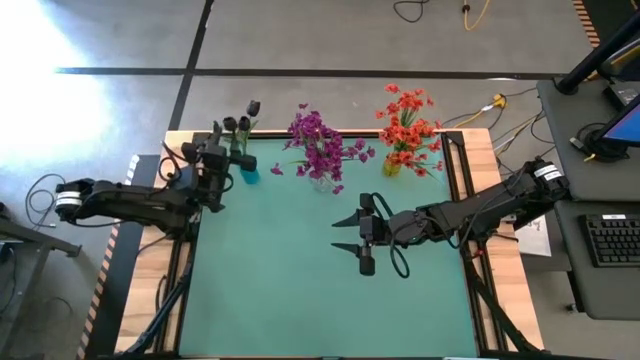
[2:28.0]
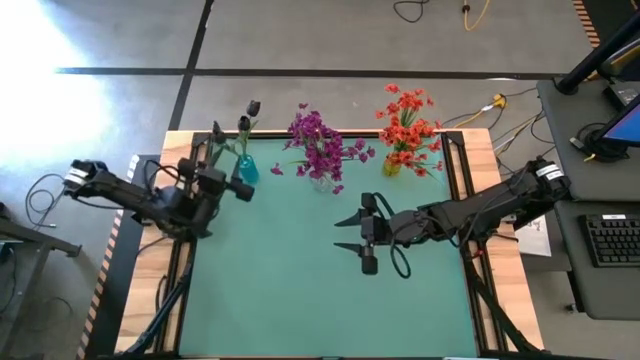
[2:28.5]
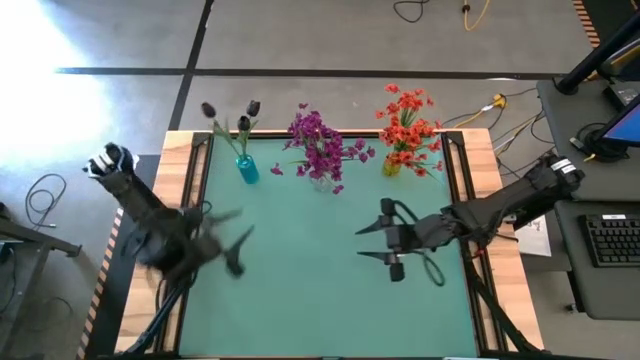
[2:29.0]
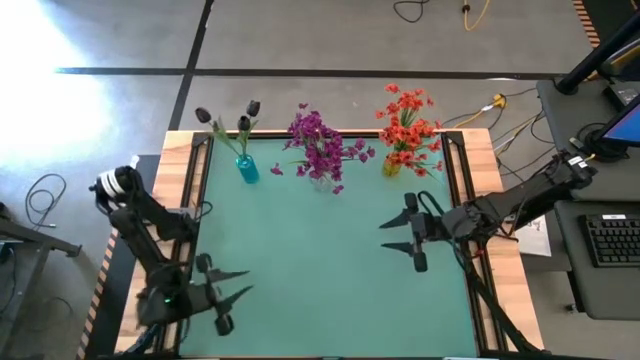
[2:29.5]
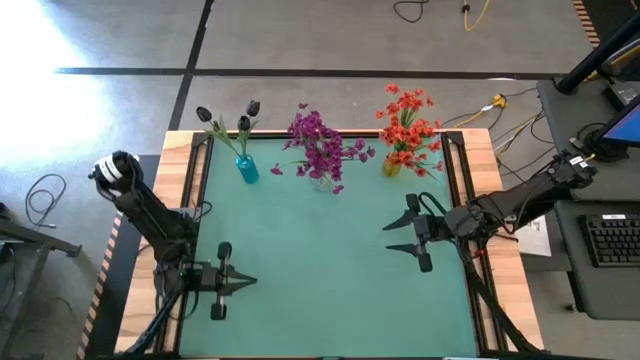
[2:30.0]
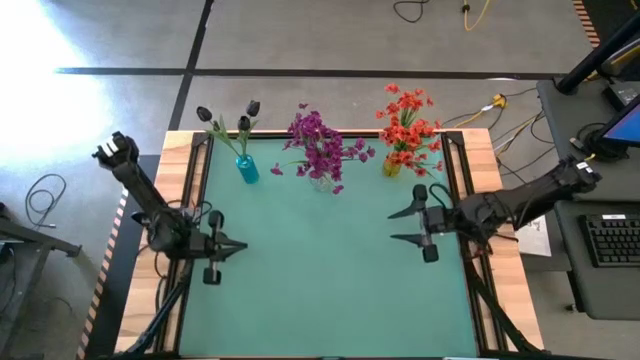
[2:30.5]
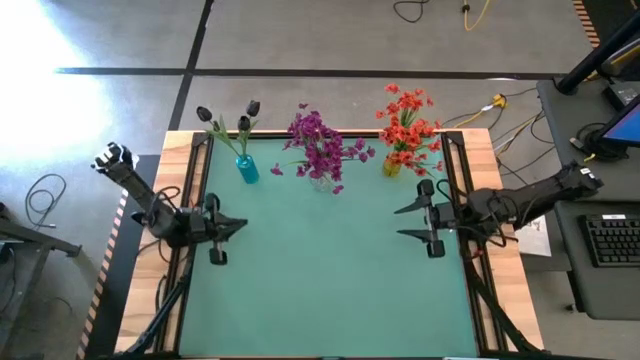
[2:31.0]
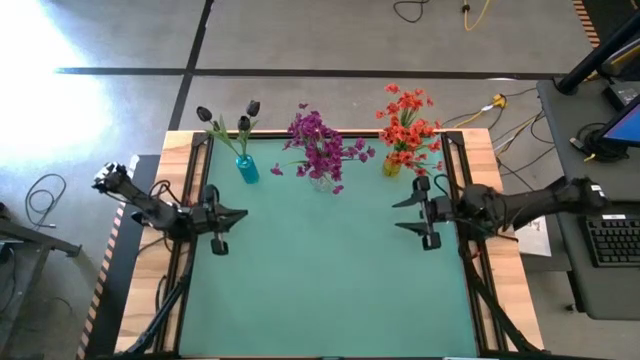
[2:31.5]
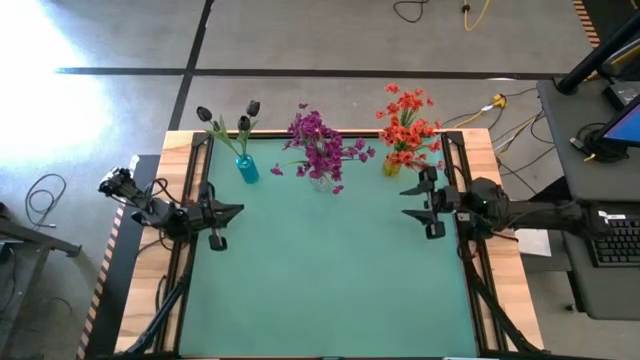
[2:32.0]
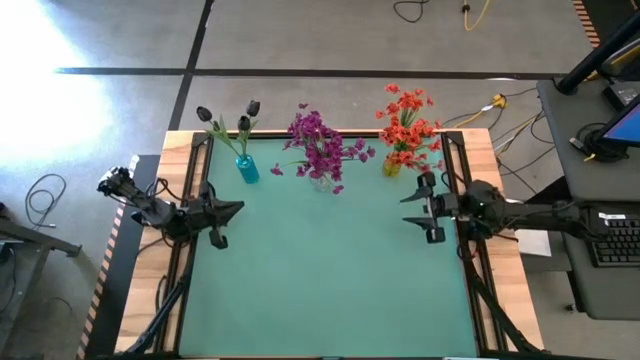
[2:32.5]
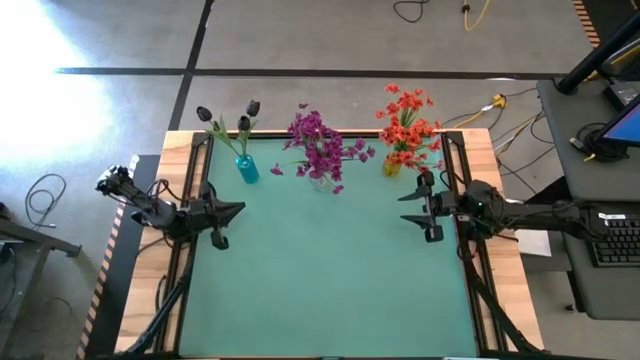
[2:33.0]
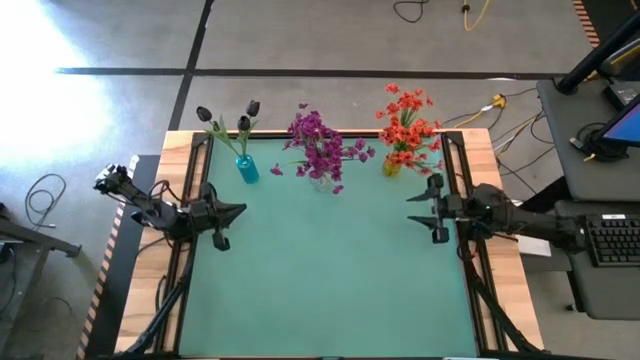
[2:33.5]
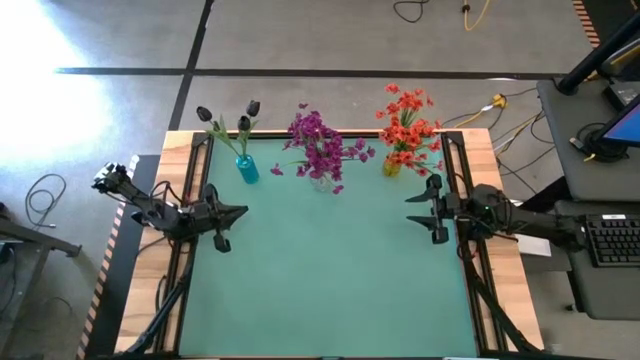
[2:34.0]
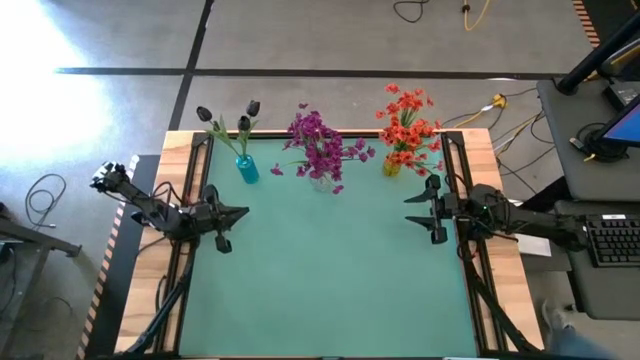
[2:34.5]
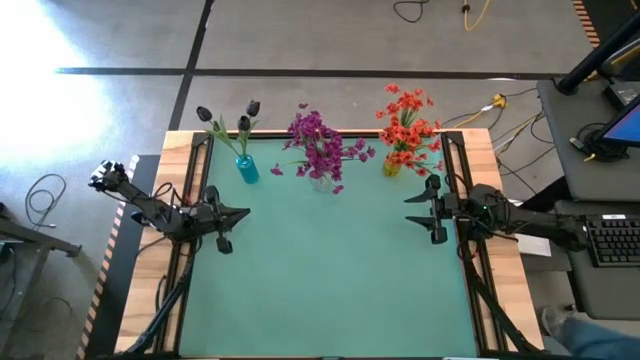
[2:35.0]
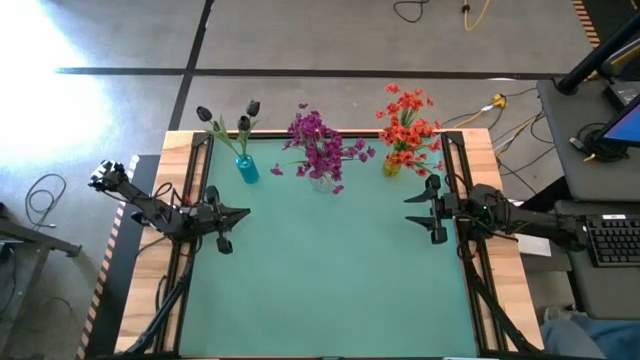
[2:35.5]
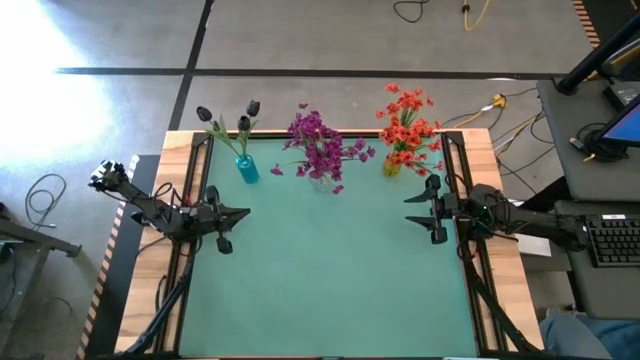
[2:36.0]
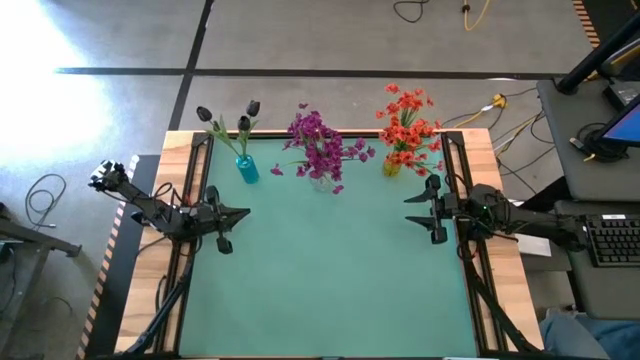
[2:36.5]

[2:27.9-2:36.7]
Task: Sort flowers into vase by color
Return to Home Position

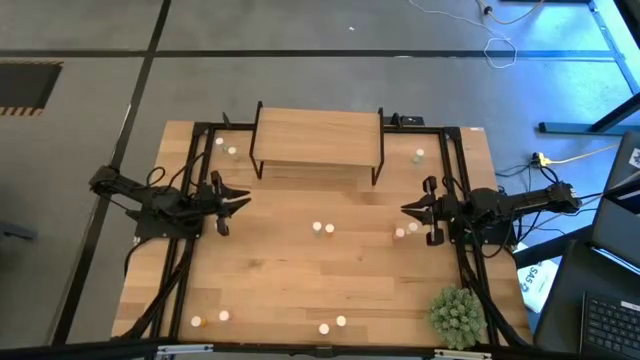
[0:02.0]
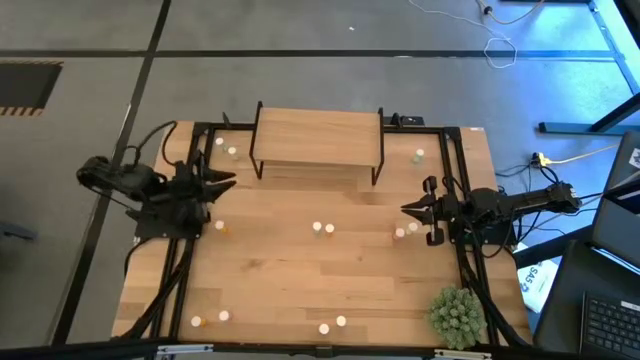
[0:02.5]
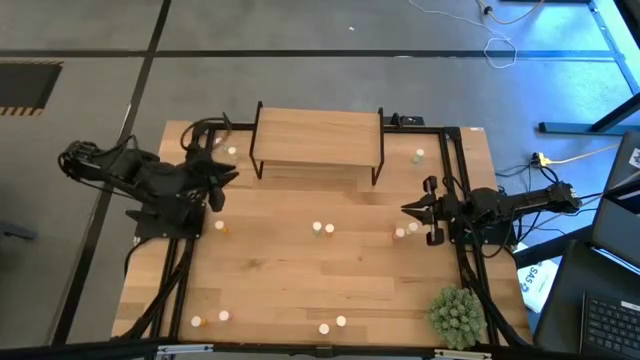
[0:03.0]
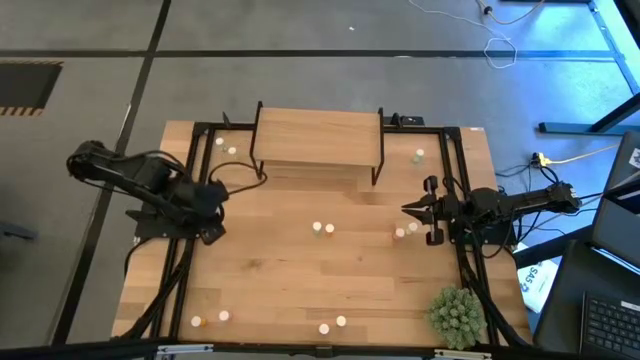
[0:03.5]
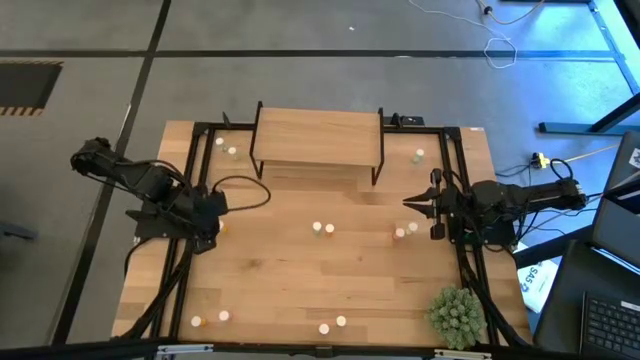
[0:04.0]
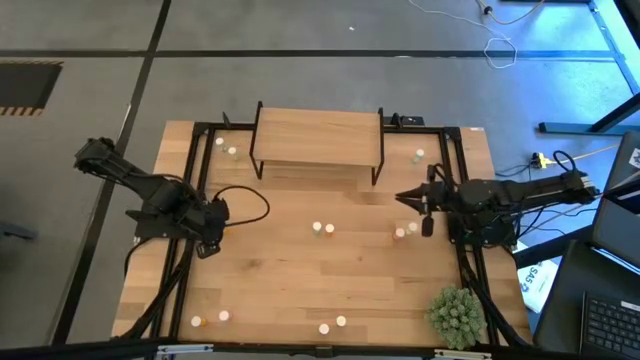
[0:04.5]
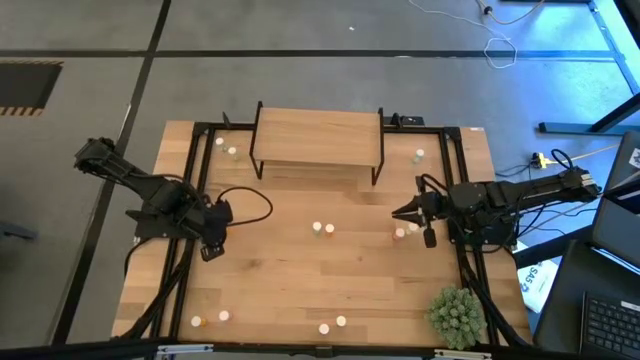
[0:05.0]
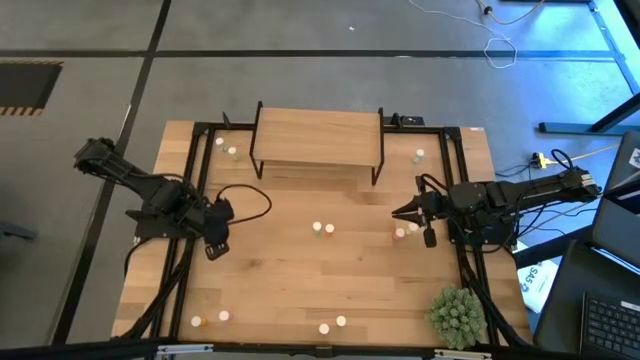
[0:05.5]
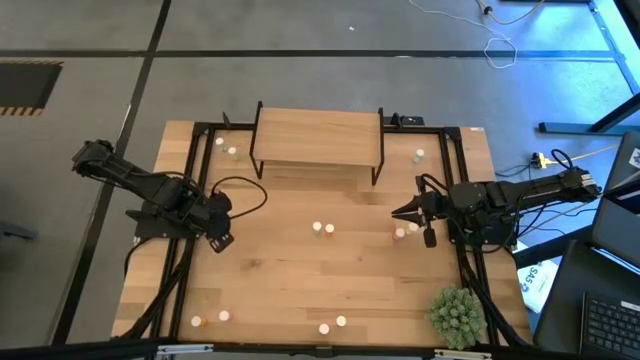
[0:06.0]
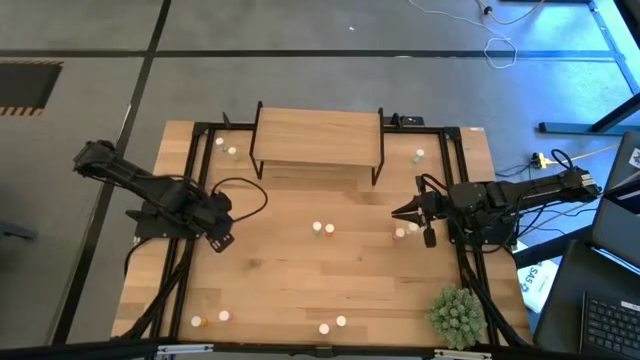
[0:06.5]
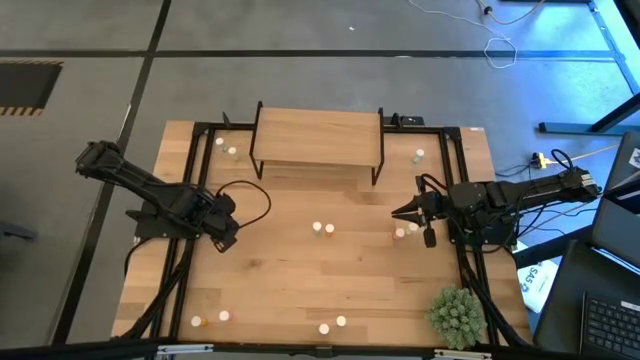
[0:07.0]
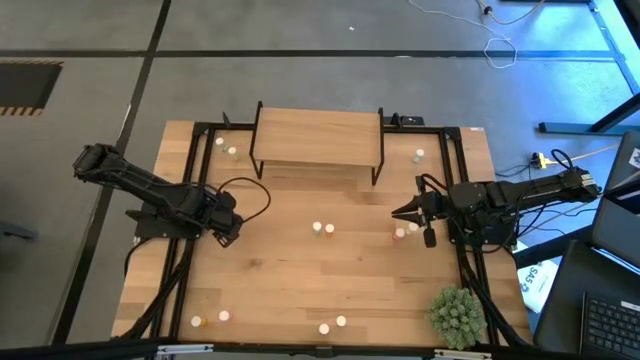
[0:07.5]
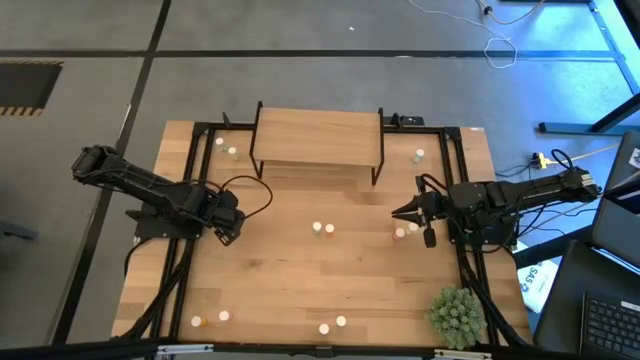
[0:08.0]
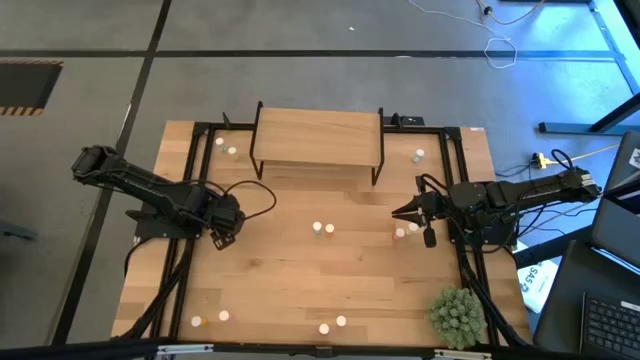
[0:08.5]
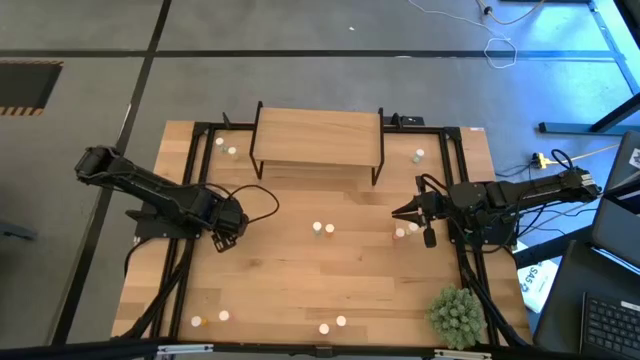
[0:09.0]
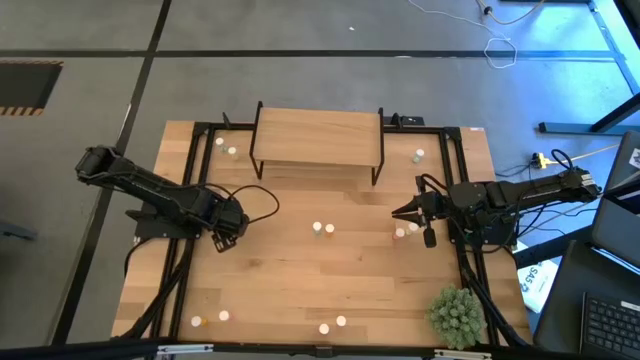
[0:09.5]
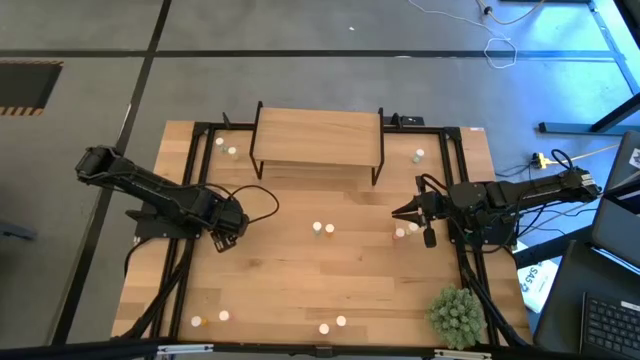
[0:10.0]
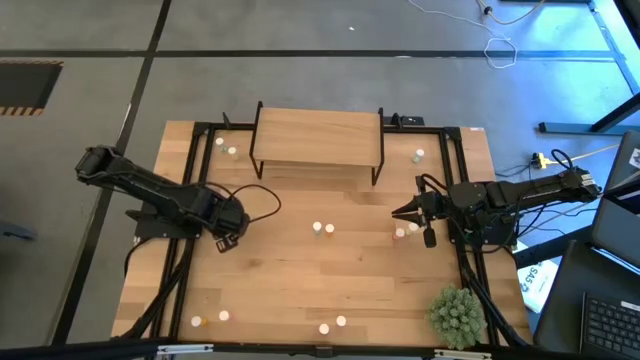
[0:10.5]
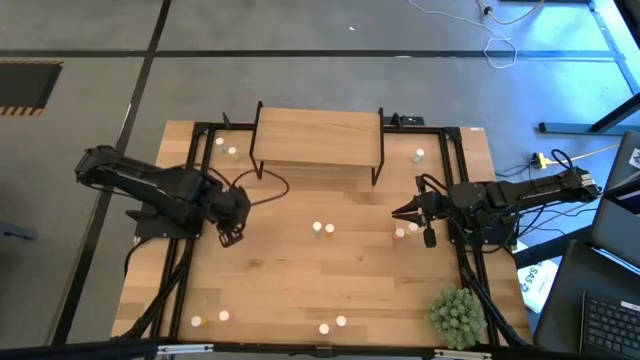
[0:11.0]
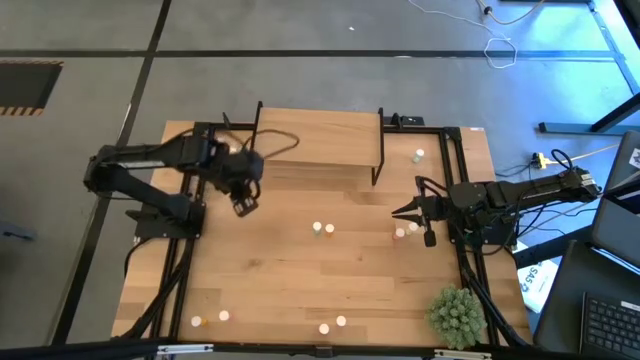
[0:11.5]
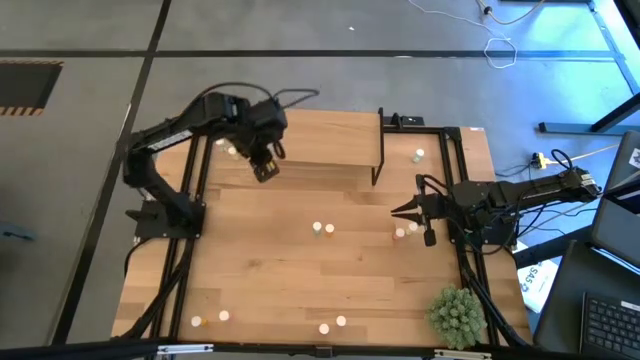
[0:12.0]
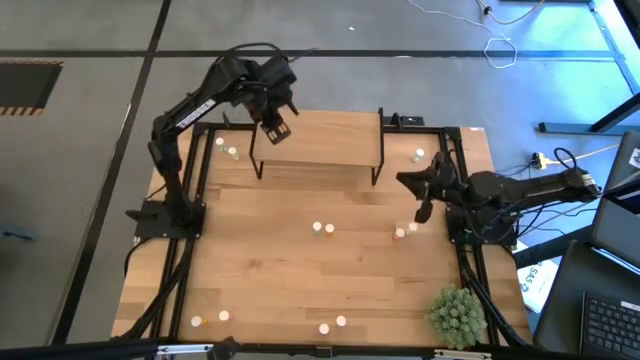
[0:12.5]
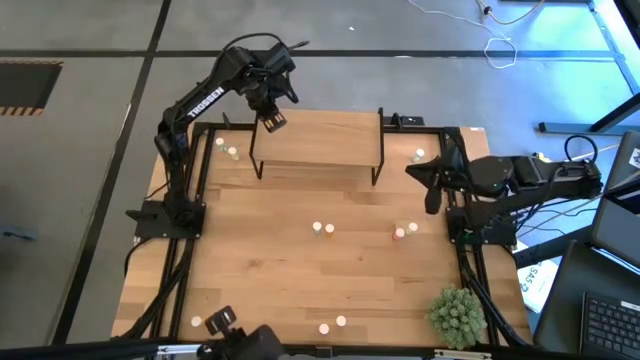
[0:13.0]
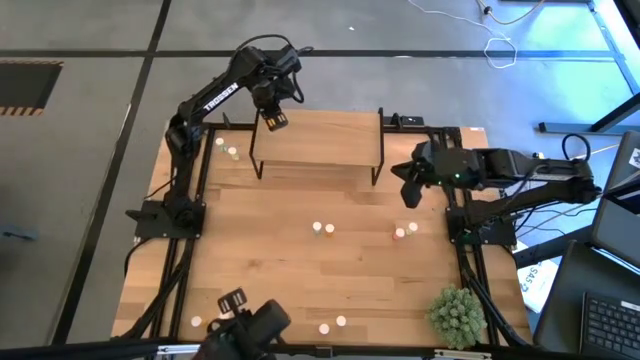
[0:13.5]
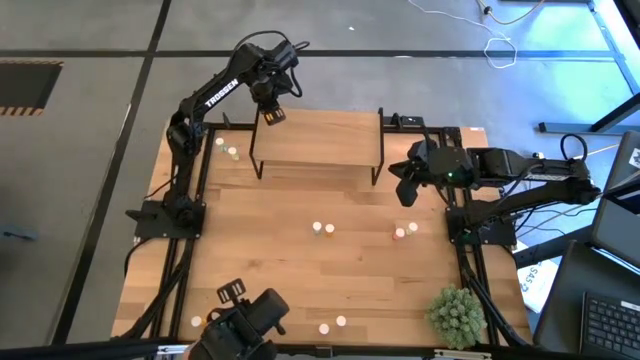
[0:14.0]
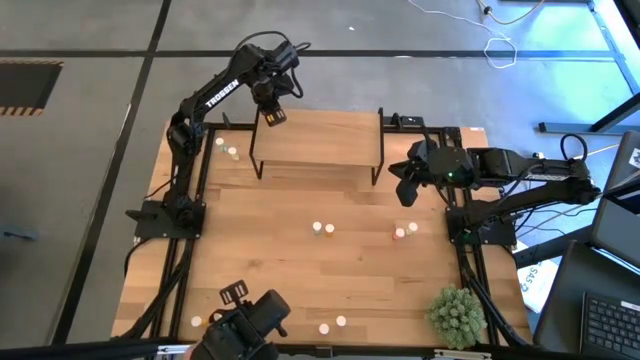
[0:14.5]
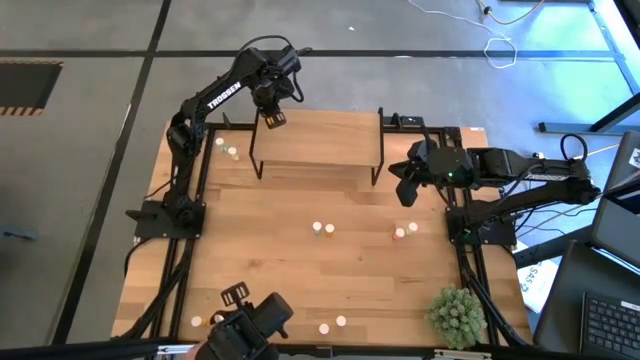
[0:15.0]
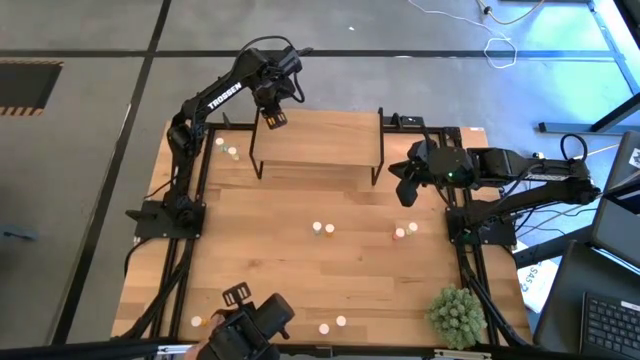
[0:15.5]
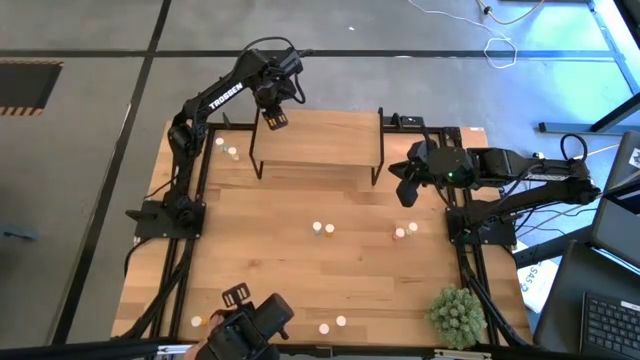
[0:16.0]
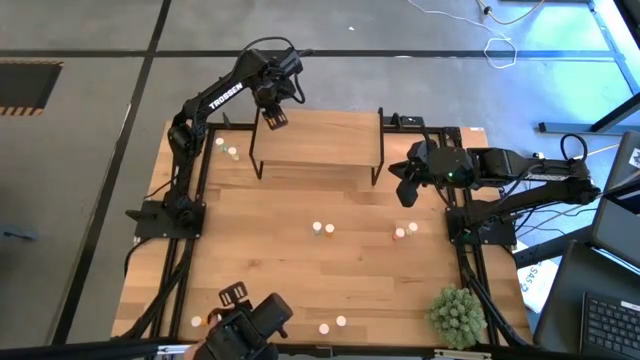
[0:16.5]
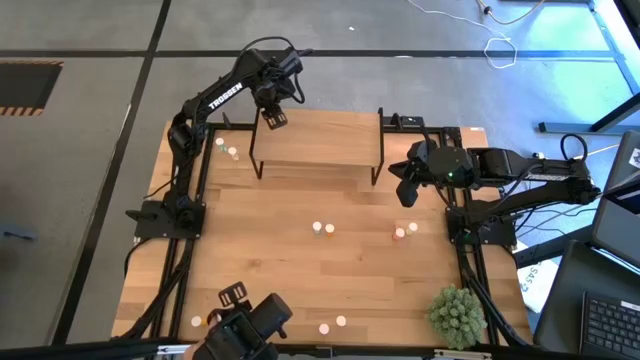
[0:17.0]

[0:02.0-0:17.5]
Task: Pick and place medicine bottles onto shelf by color
Put the top left orange pill bottle on the shelf
